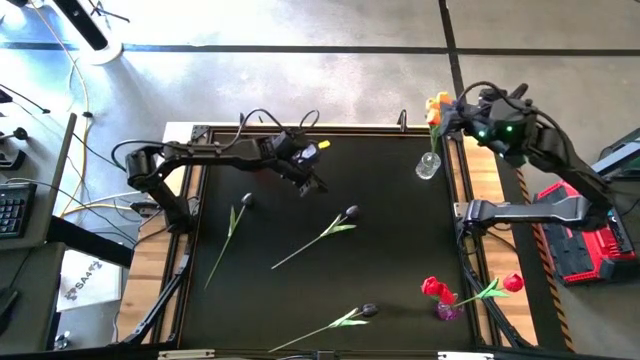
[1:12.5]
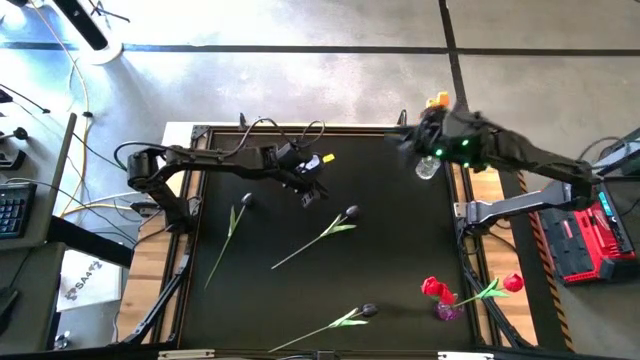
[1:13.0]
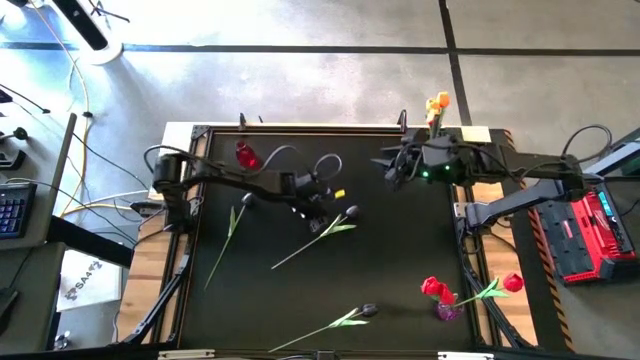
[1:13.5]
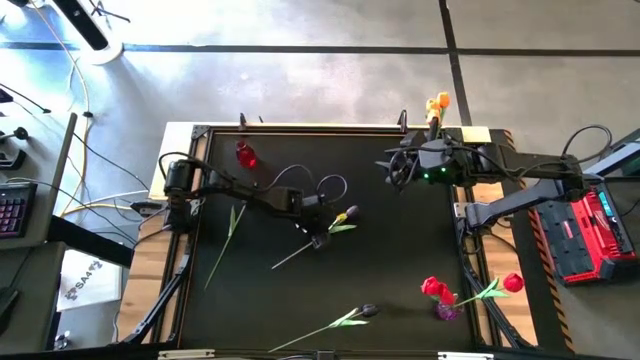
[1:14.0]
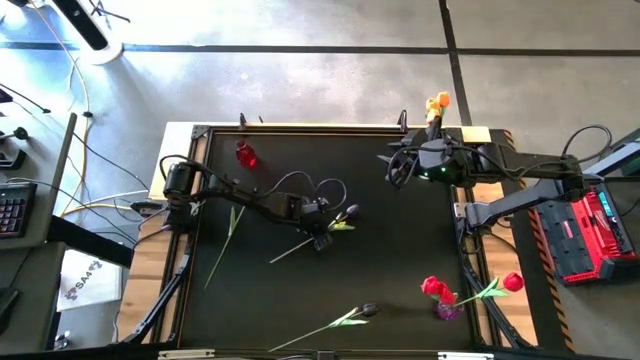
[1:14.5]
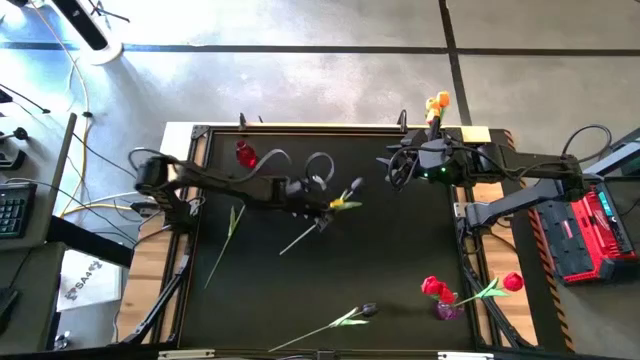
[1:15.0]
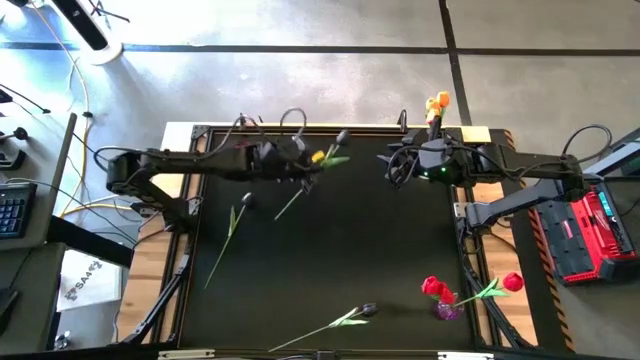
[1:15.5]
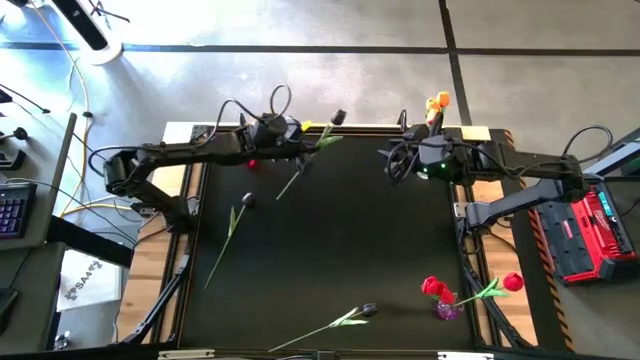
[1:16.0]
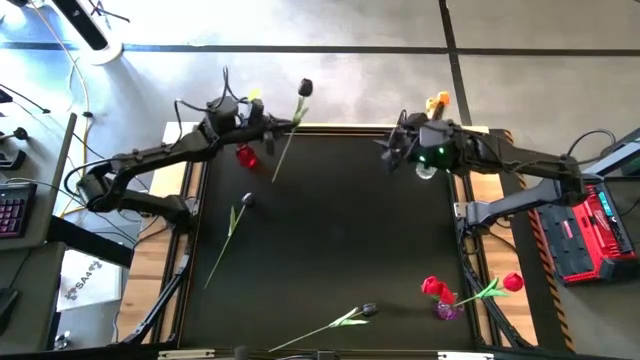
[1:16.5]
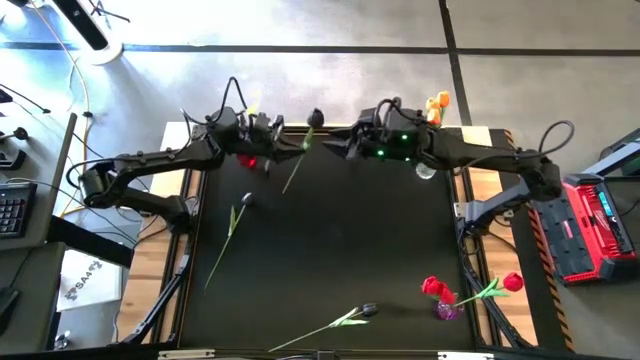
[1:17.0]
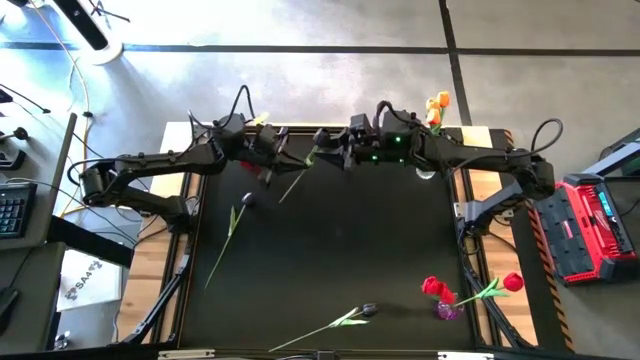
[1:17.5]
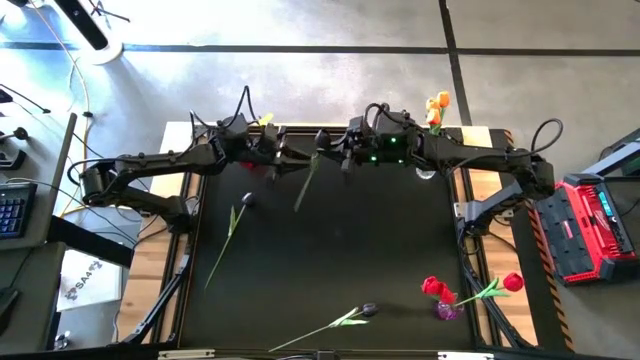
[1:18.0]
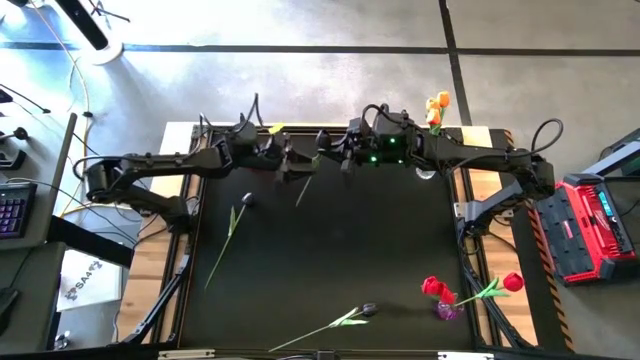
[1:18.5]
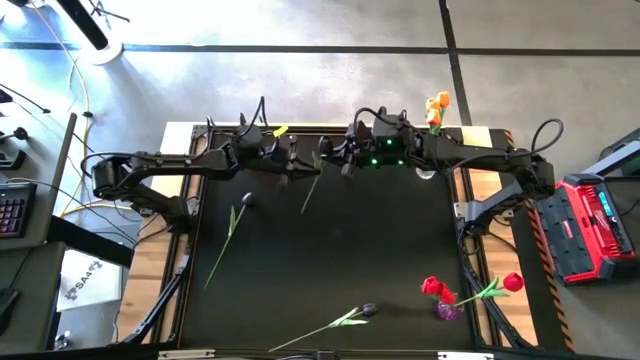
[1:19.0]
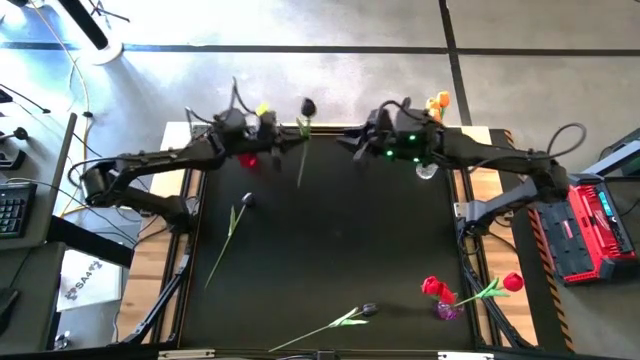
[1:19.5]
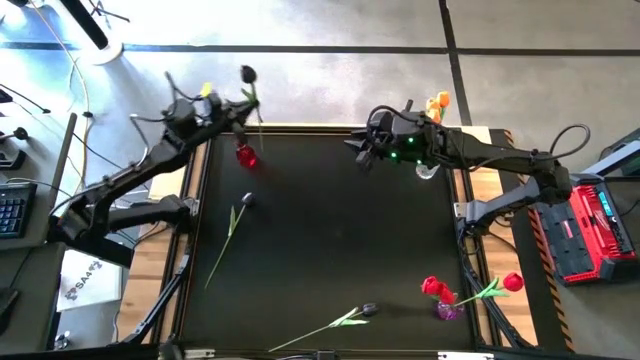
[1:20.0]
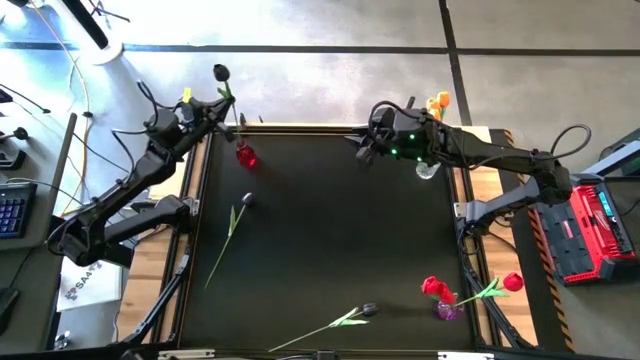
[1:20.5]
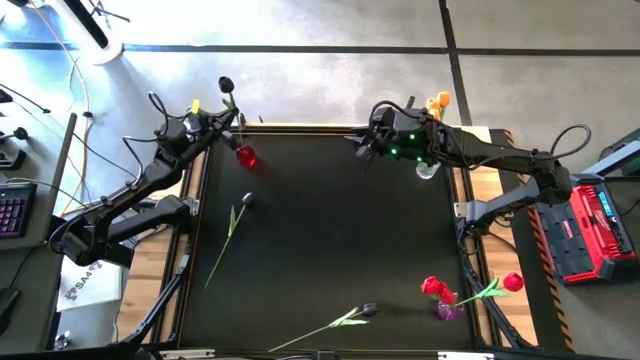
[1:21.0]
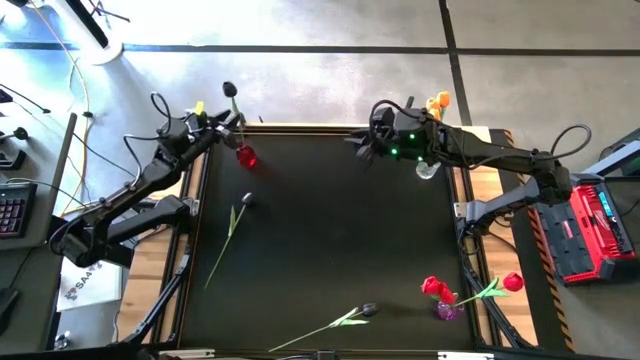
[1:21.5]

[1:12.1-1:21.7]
Task: Sort flowers into vase by color
Put the top right black tulip into the red vase

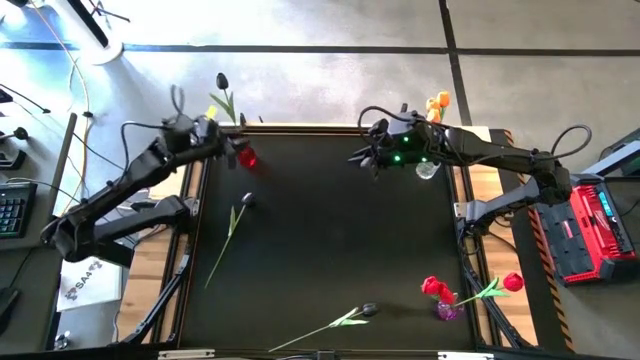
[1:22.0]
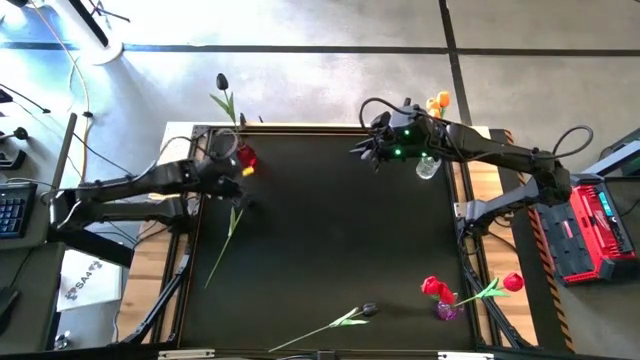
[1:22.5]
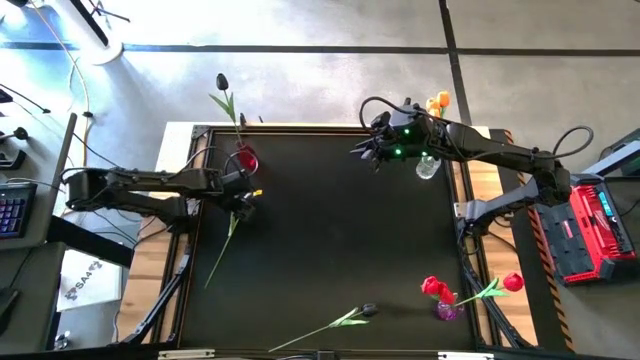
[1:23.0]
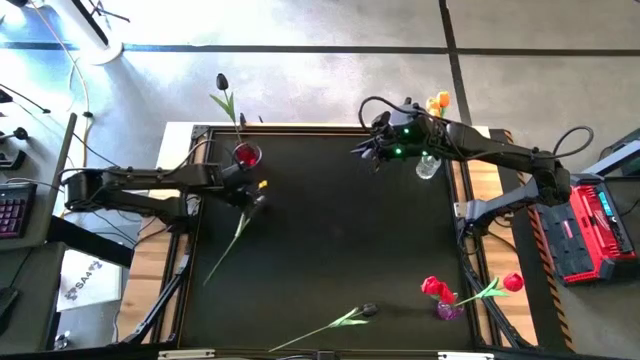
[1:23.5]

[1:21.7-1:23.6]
Put the top black tulip into the red vase

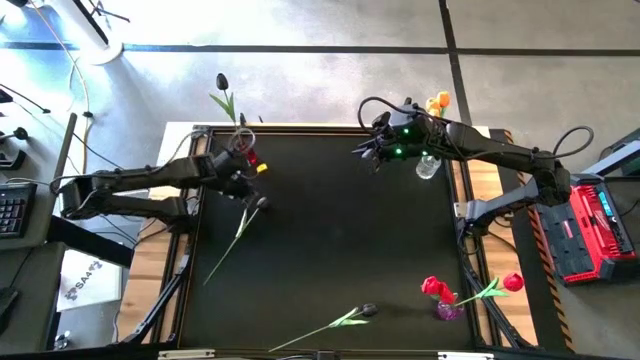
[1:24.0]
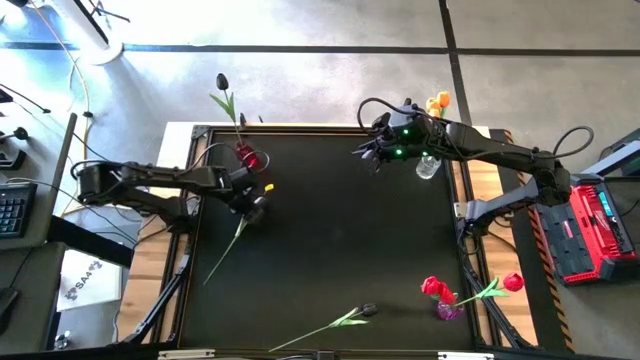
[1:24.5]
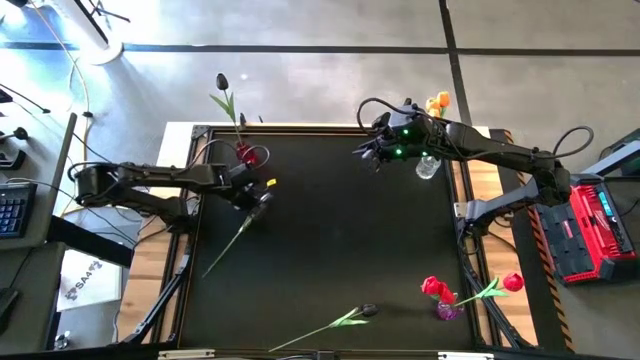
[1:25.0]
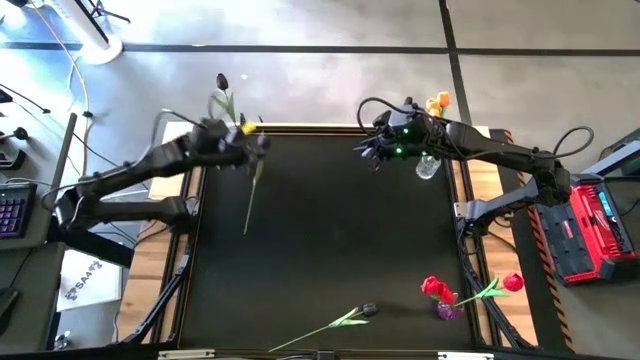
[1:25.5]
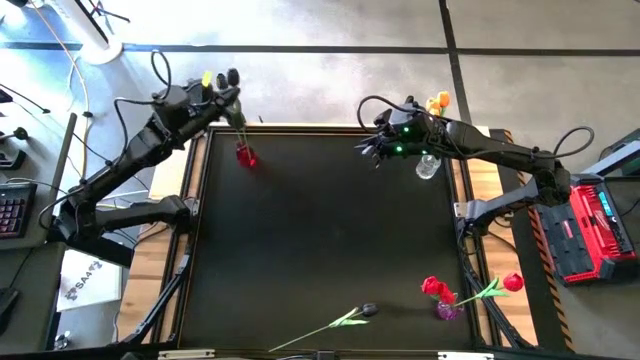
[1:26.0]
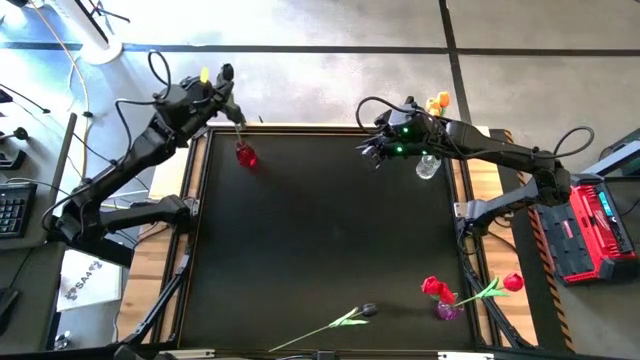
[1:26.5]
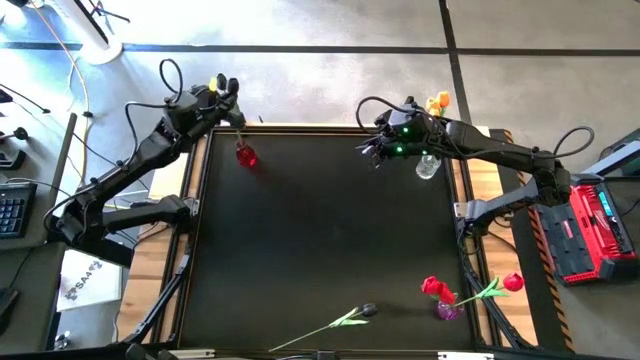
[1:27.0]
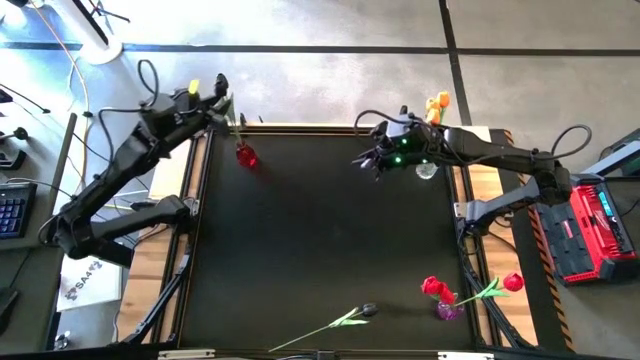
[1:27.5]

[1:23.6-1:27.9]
Put the top black tulip into the red vase

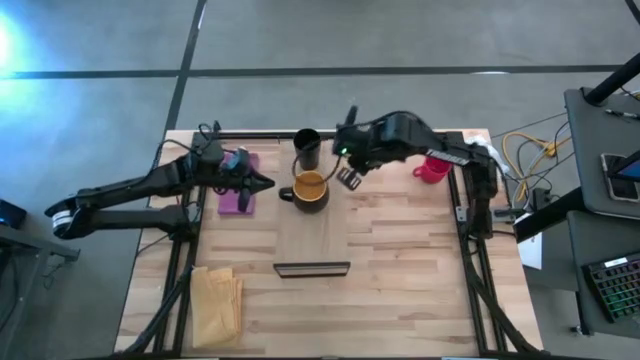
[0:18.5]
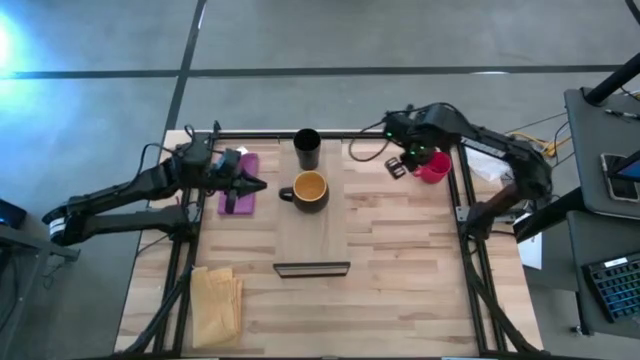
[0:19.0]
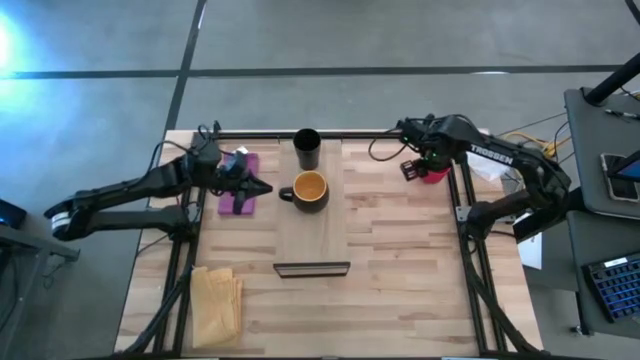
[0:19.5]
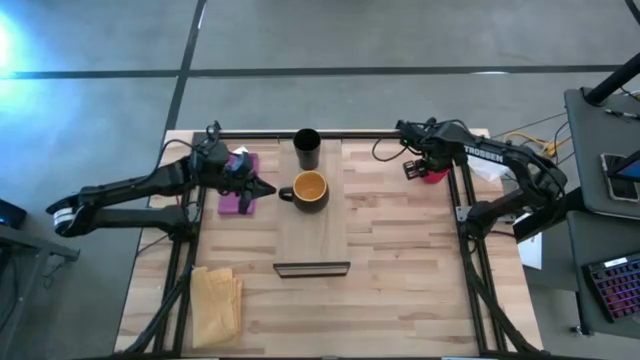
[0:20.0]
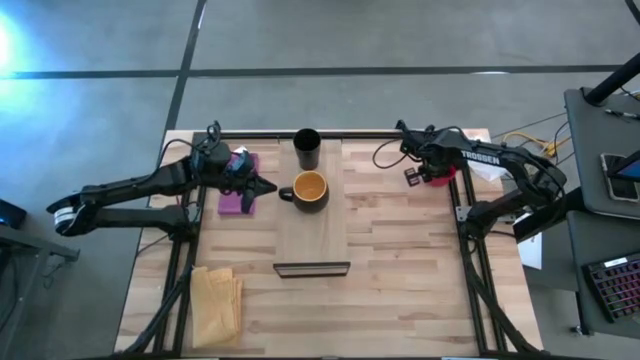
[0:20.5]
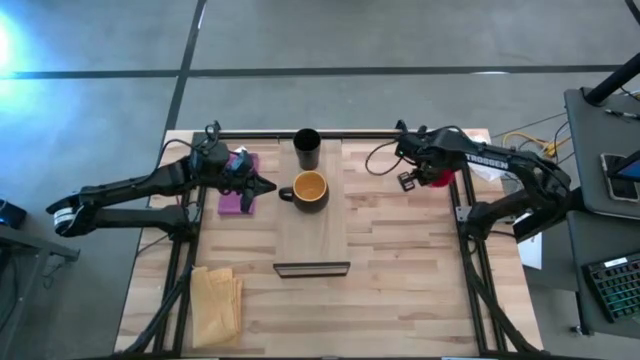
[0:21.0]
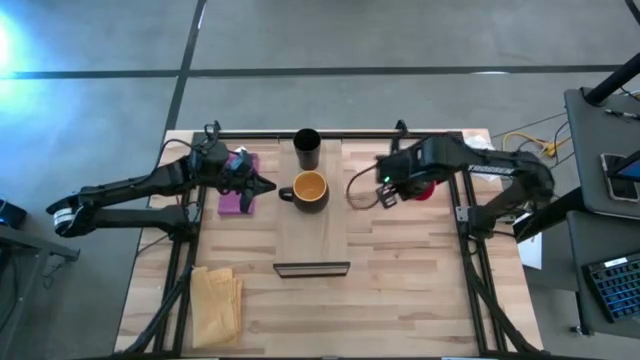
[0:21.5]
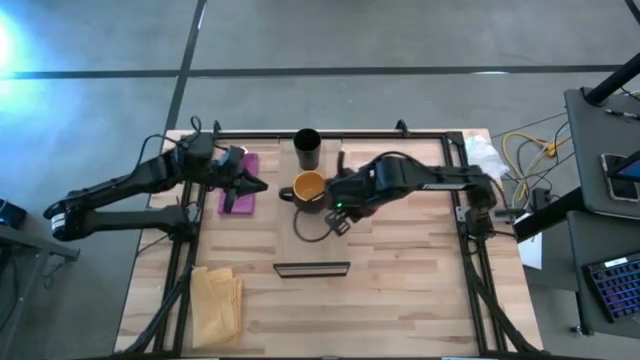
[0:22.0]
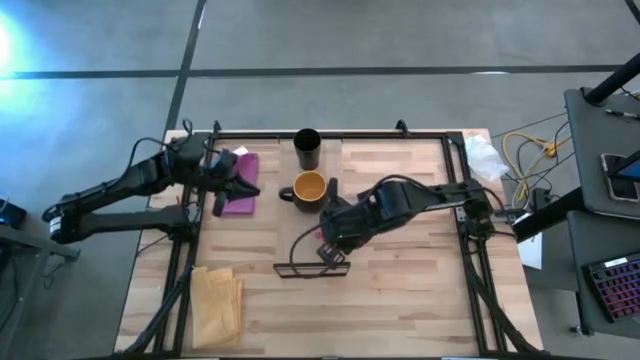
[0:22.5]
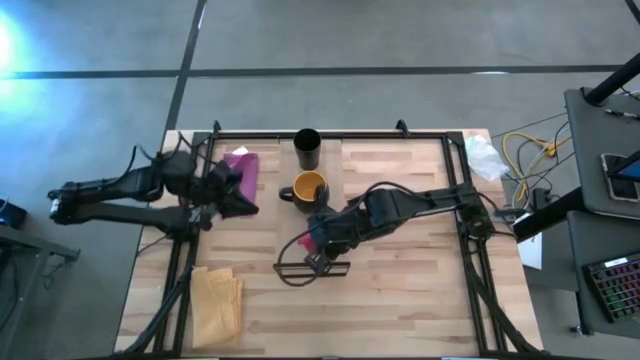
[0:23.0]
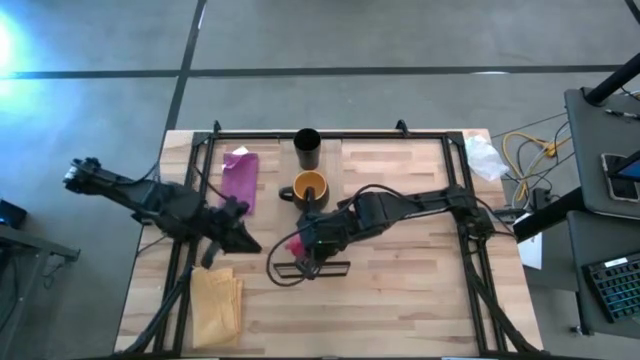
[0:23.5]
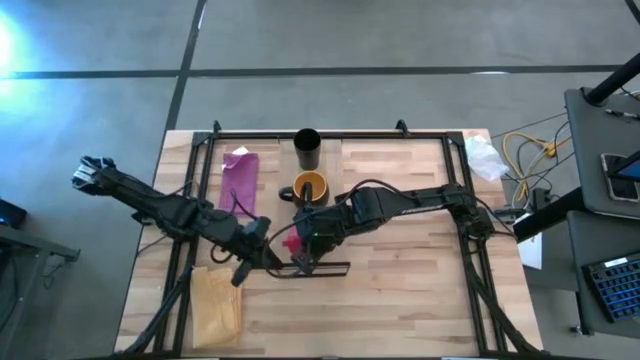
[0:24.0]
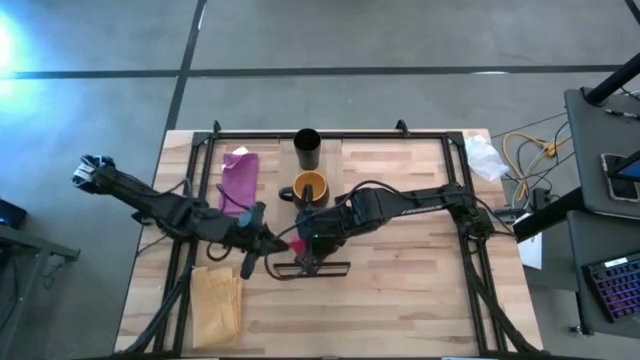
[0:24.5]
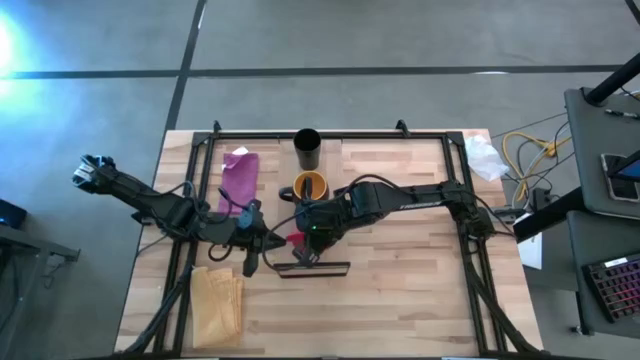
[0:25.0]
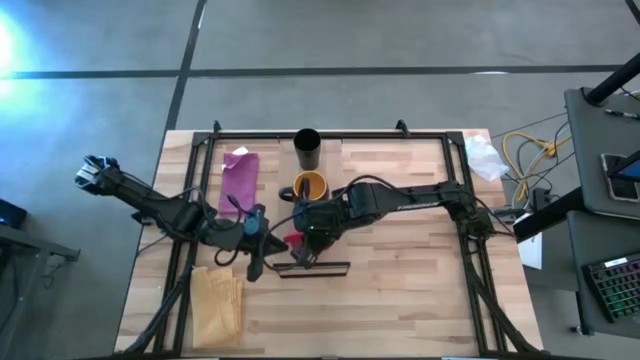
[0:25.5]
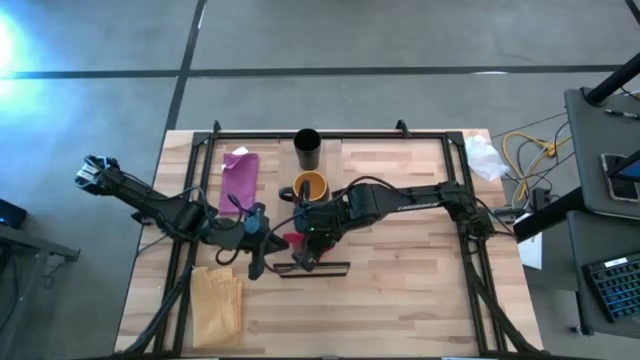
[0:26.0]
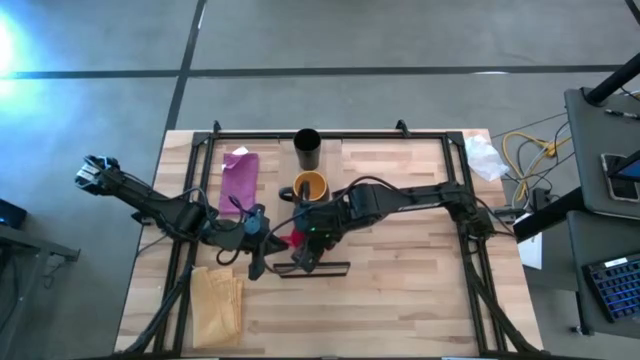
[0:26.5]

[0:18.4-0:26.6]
Task: Stack small to large cups/mugs on shelf
Put the red mug on the shelf
